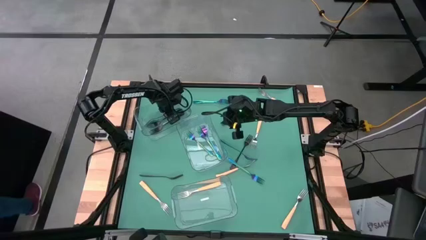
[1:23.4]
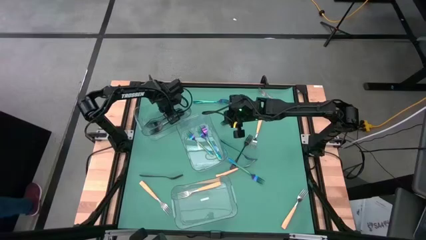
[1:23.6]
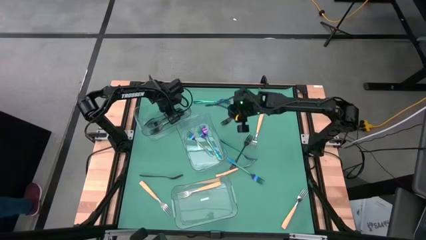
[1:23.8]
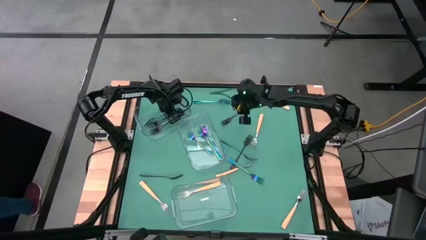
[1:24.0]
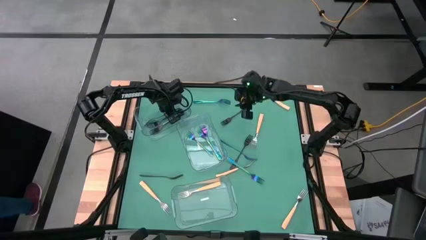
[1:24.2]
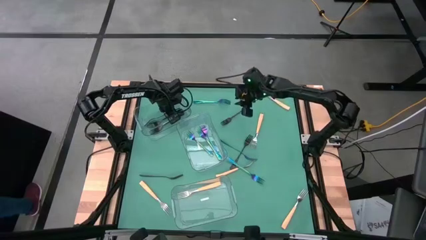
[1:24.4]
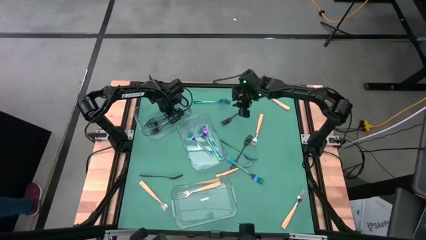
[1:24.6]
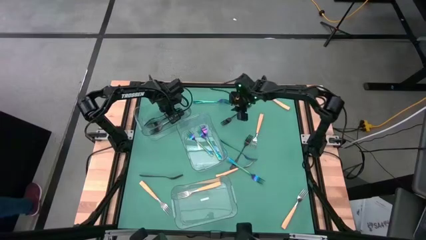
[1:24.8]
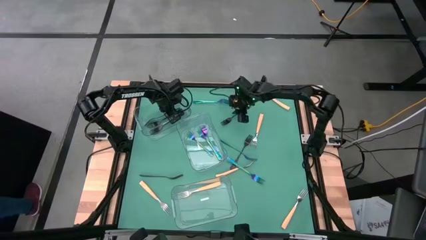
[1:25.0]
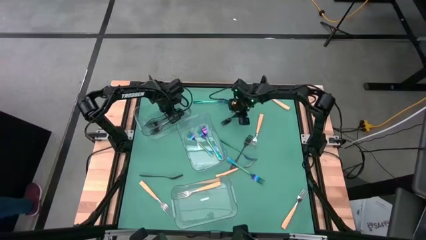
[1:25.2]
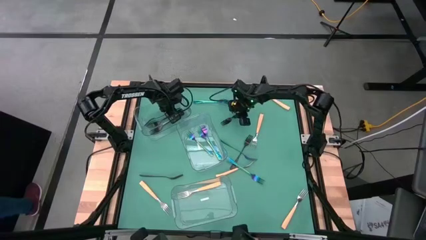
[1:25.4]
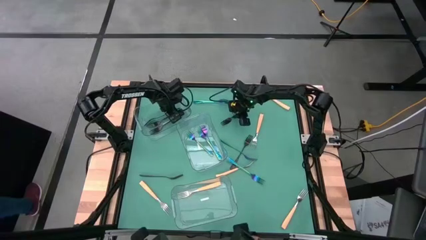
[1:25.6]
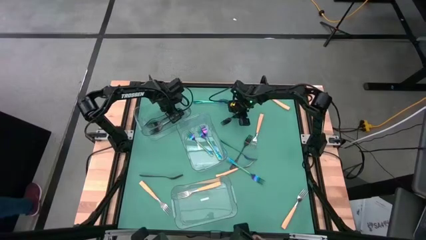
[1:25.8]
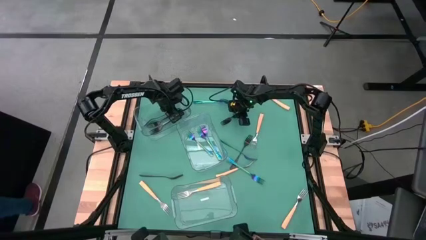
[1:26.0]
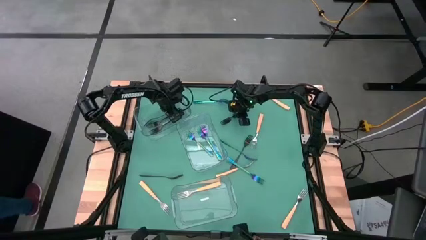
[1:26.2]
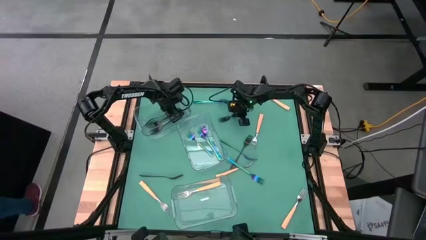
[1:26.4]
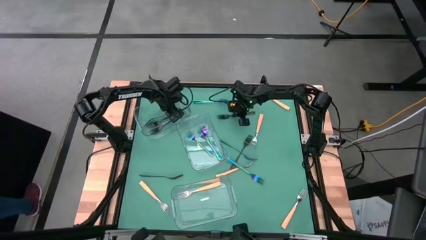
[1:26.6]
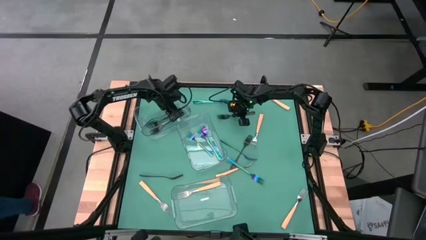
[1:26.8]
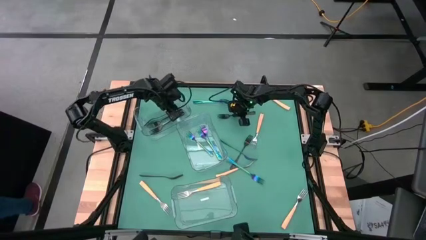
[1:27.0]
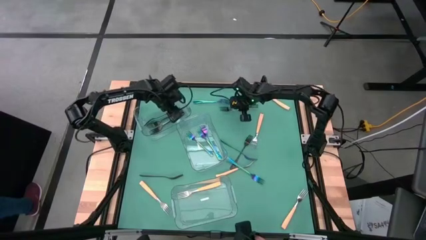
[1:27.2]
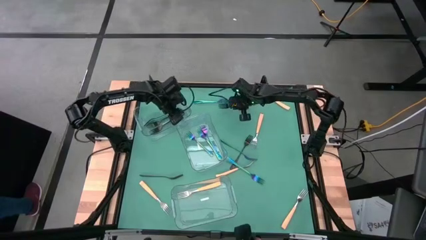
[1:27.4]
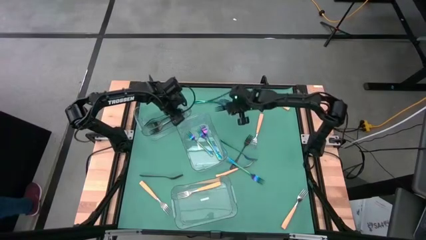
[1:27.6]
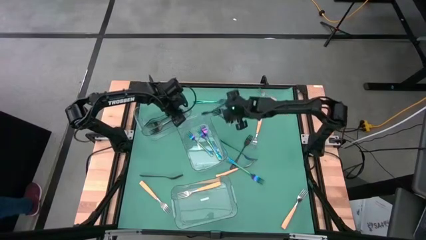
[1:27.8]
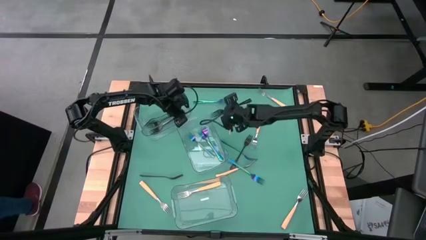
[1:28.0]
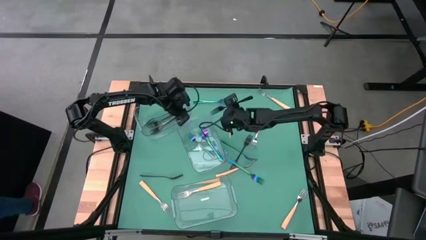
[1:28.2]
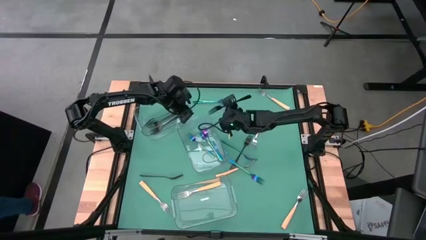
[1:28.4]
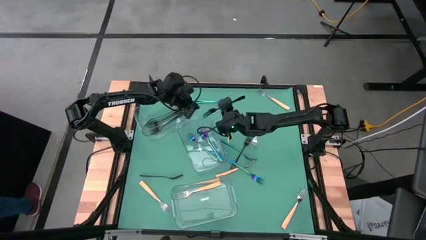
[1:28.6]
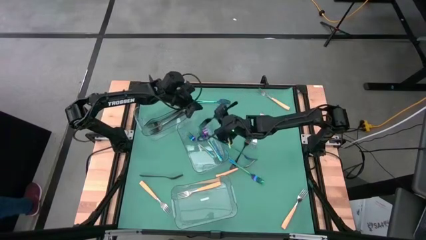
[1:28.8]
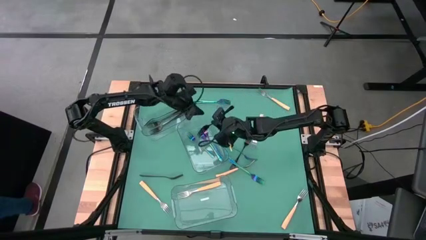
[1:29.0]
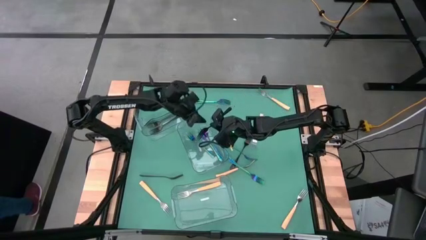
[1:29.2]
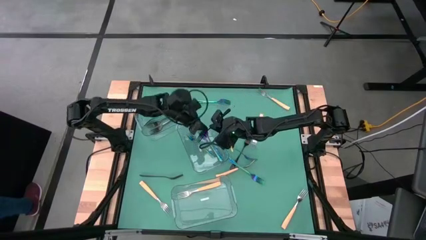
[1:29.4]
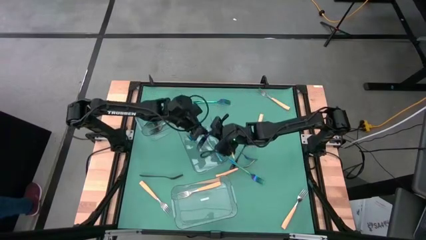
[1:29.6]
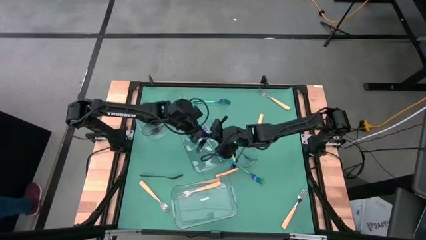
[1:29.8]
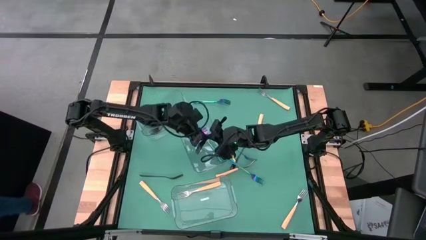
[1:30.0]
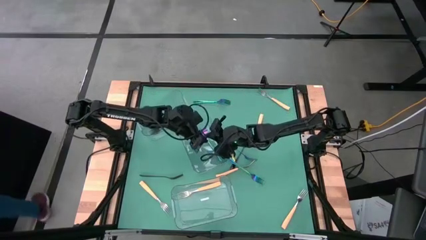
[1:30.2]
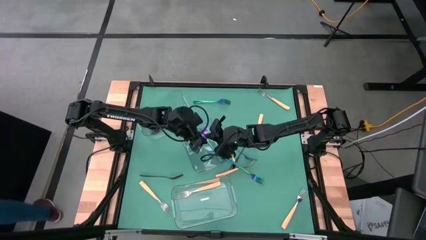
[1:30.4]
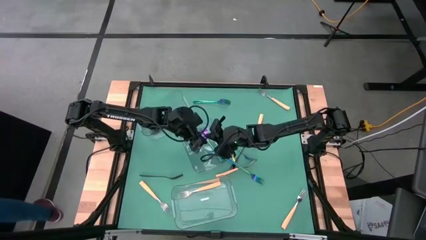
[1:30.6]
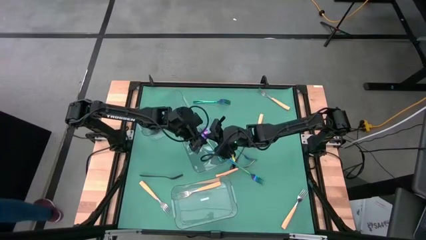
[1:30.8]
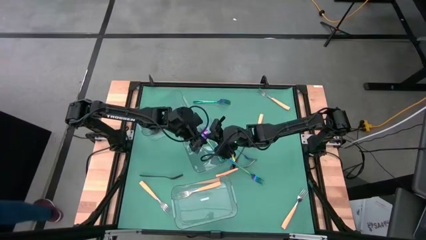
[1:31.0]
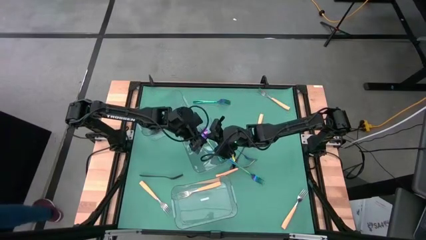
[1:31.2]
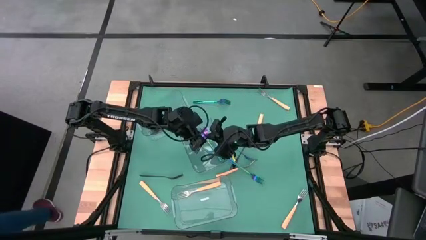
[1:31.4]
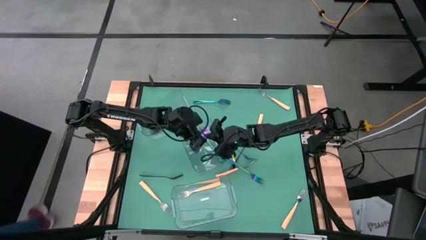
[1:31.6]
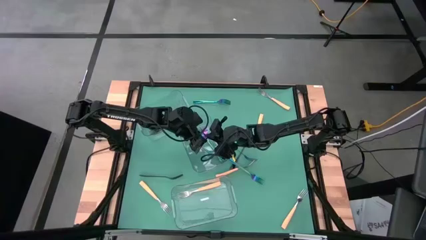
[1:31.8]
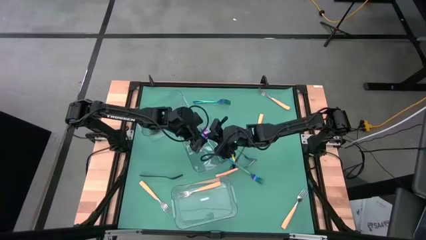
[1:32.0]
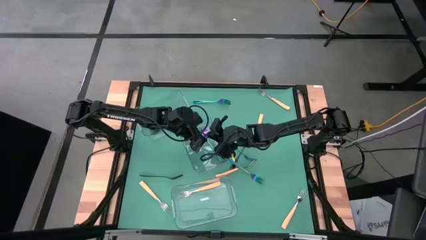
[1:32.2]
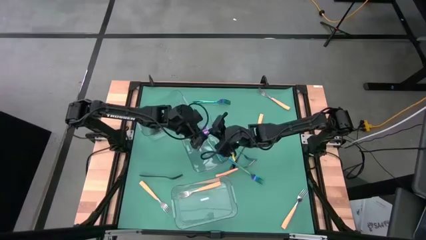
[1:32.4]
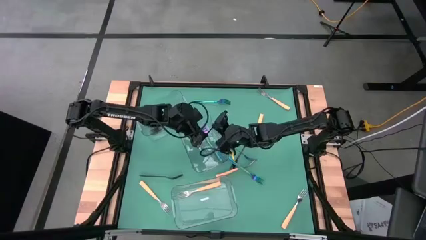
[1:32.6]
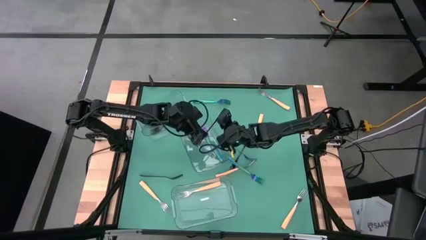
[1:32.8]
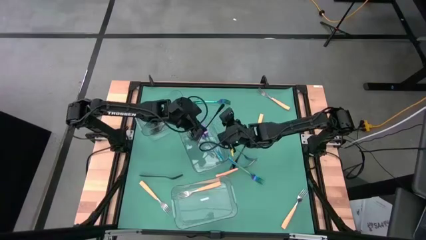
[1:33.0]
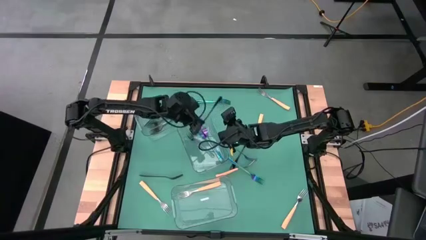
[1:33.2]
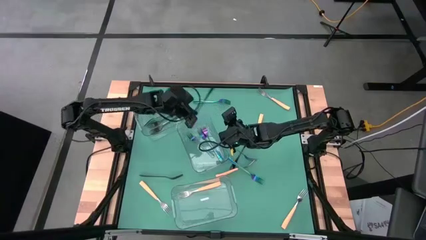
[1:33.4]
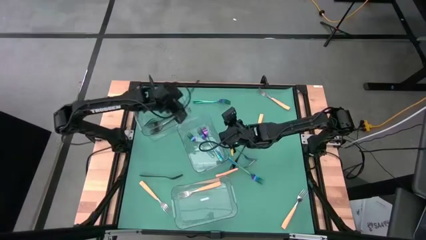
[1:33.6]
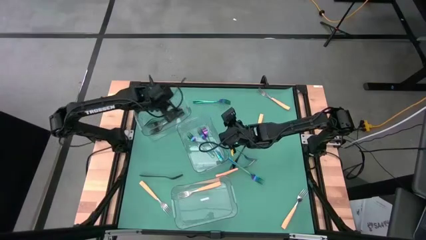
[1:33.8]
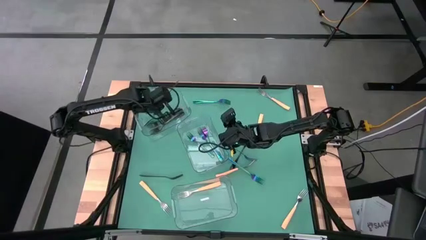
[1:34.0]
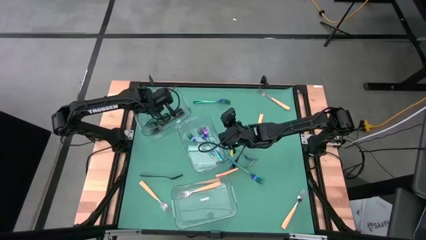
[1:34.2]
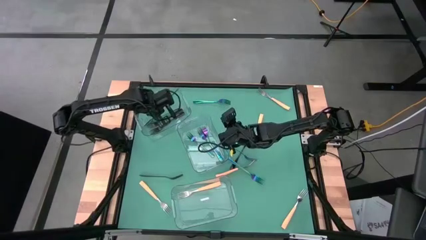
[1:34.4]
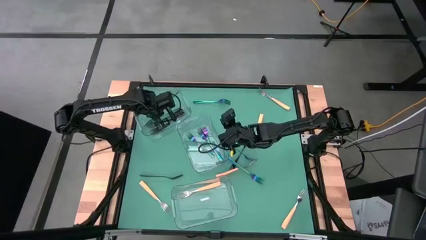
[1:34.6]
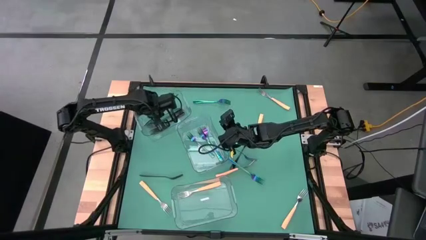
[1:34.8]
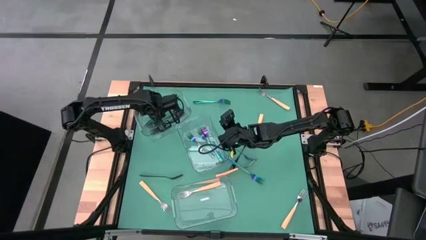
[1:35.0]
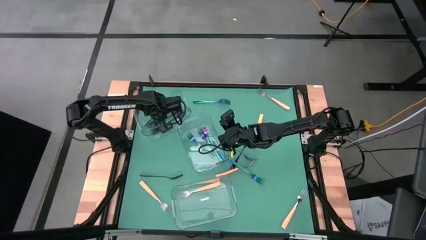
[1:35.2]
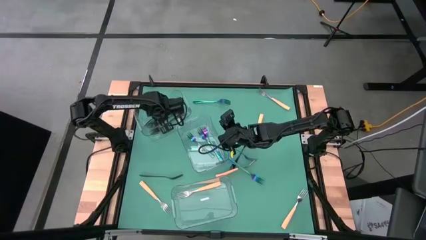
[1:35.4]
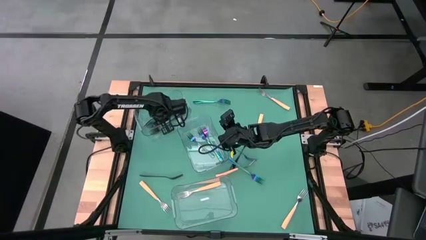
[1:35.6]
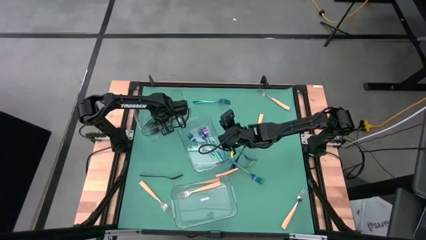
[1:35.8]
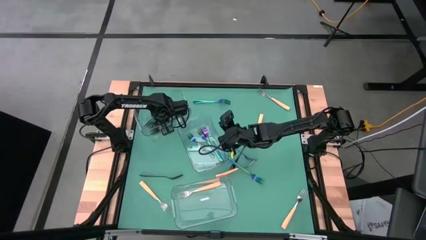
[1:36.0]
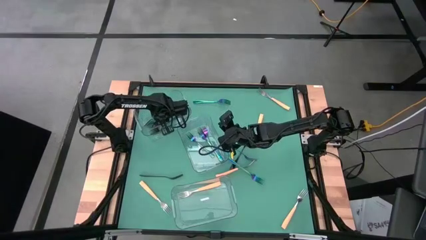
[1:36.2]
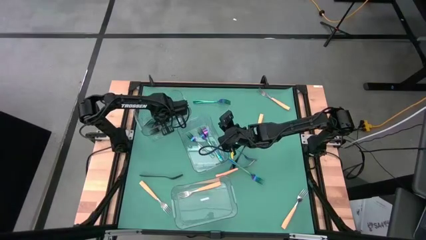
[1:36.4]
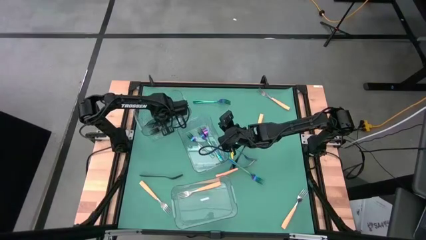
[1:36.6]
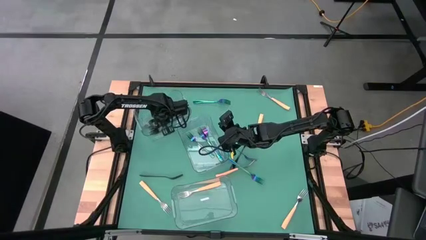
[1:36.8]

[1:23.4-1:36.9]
Task: Sort silverware by color (type)
Put the black fork into the top transparent bin

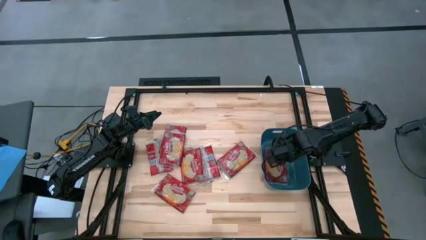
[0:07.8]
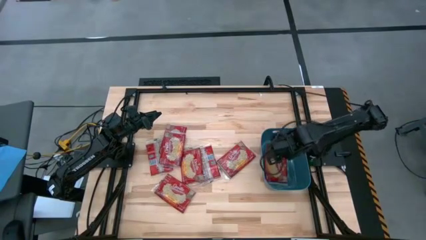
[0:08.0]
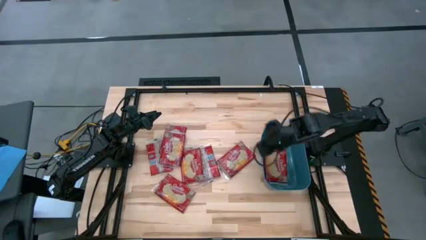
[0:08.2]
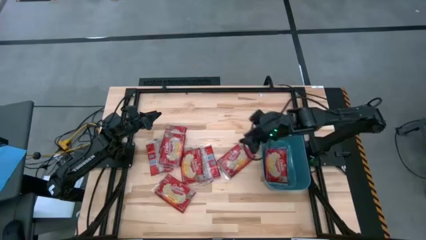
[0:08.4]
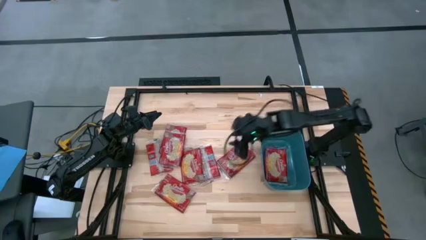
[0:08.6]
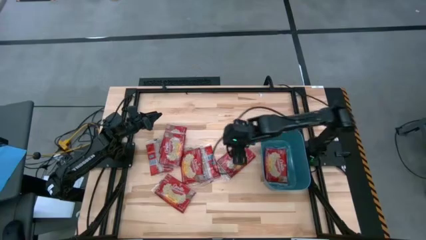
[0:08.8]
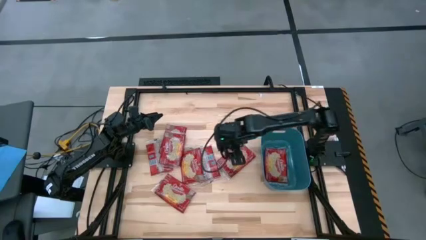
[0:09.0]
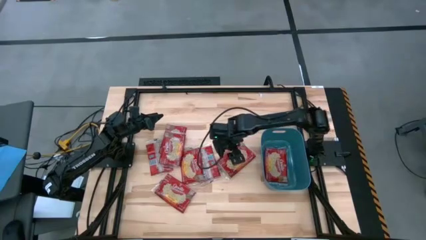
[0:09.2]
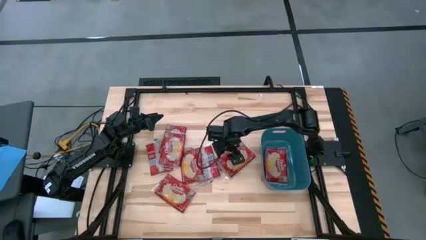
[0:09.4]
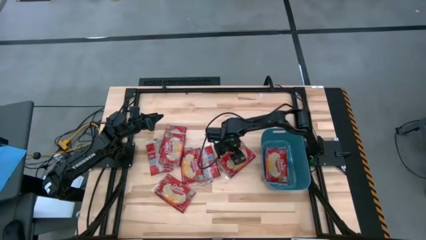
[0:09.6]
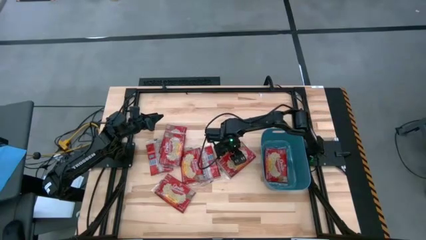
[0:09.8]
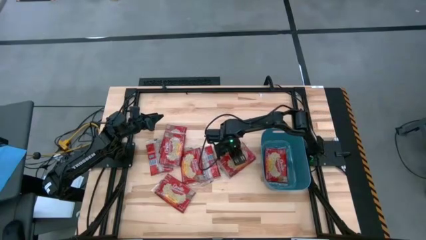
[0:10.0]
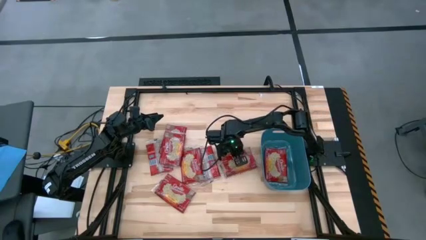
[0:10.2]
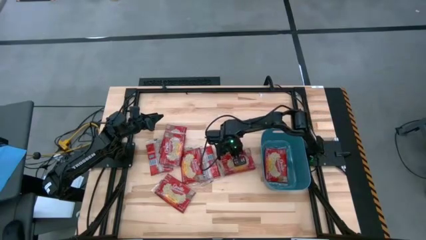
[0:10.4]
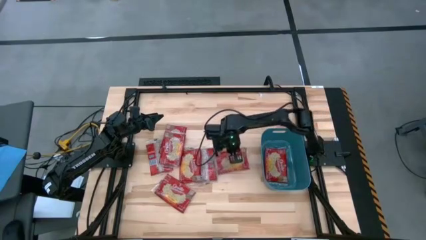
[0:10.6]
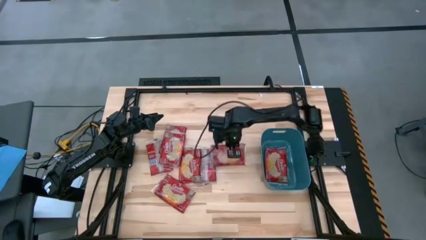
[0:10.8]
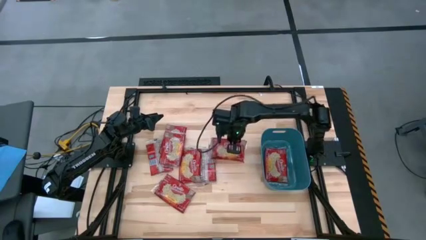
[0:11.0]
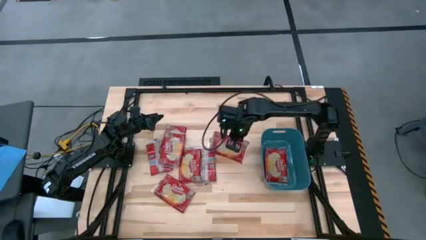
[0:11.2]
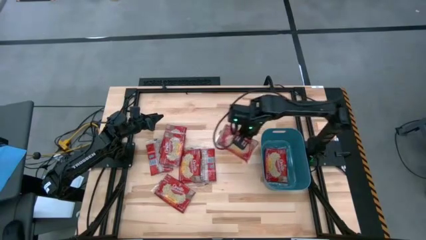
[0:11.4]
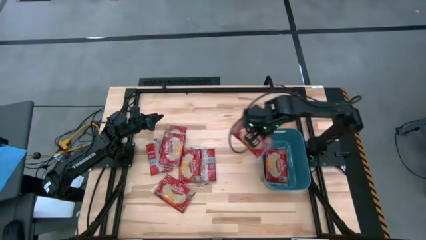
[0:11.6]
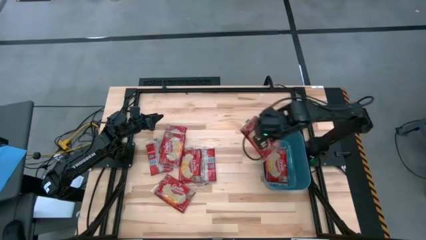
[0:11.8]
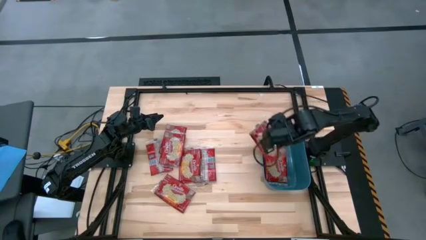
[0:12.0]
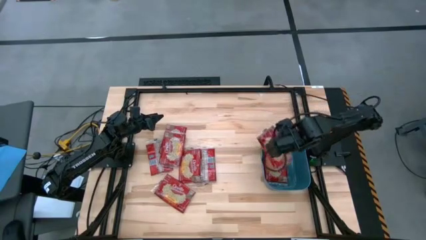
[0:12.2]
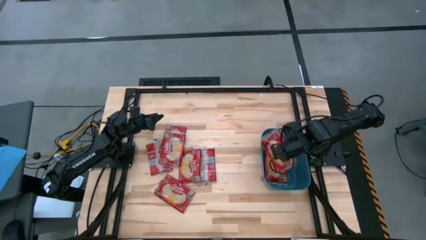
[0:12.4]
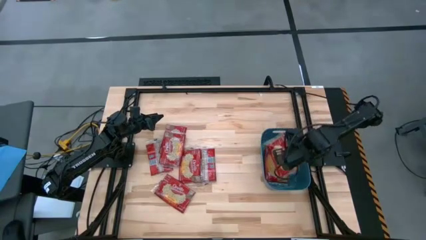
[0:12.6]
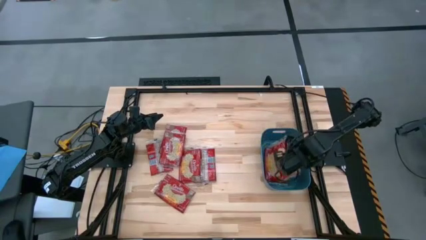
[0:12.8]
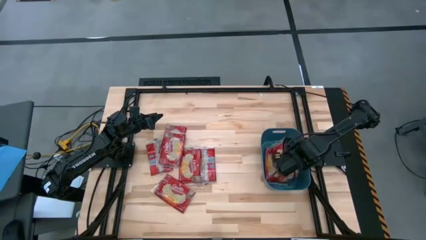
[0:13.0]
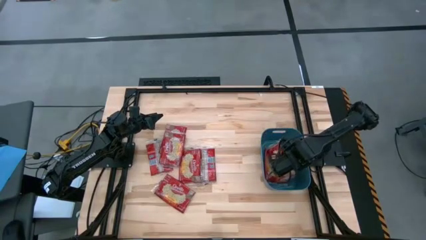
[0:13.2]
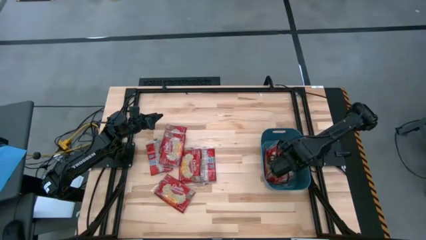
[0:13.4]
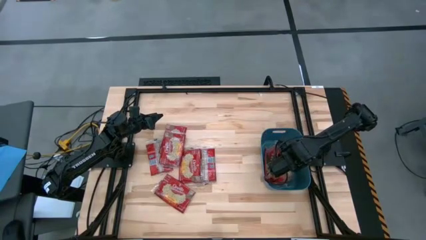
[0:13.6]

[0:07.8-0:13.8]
Task: Sort popcorn bags into baskets
Stack the popcorn bag in the blue bin
